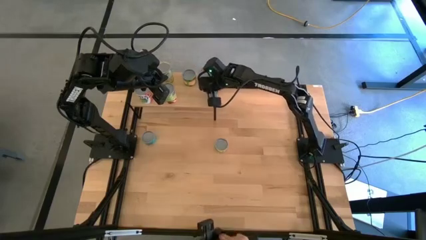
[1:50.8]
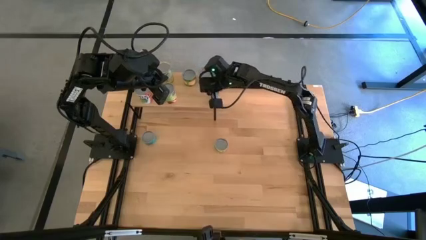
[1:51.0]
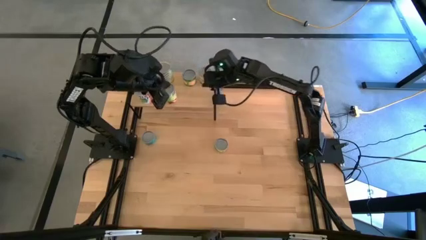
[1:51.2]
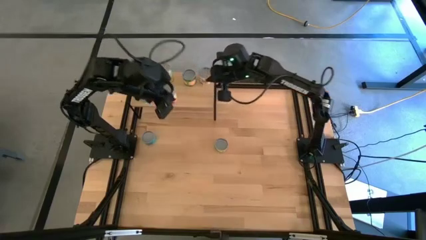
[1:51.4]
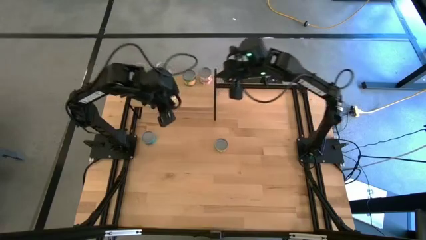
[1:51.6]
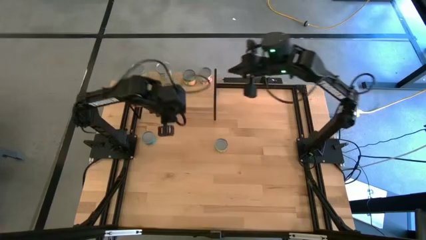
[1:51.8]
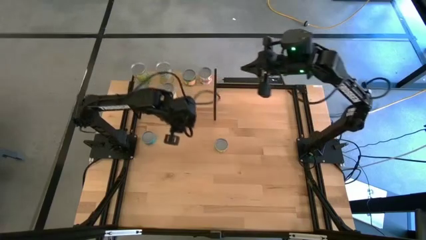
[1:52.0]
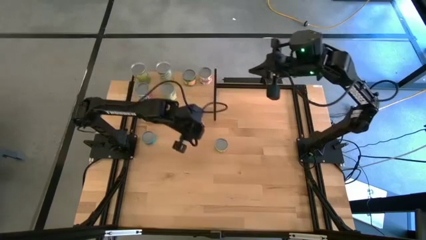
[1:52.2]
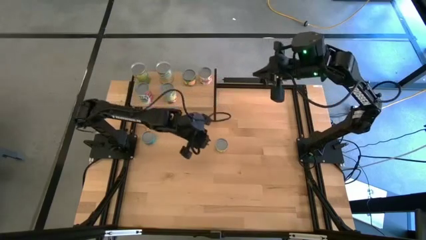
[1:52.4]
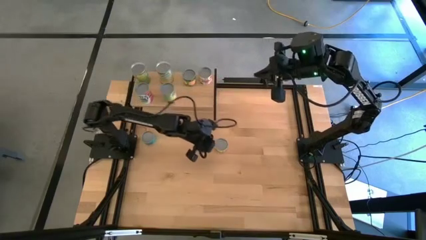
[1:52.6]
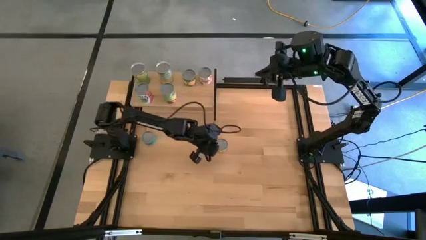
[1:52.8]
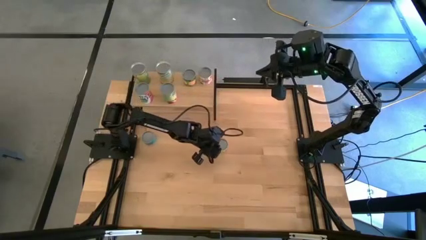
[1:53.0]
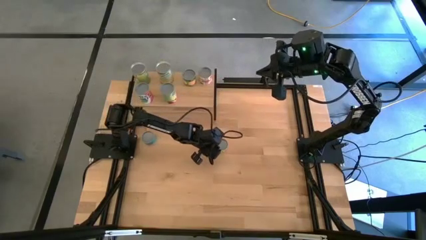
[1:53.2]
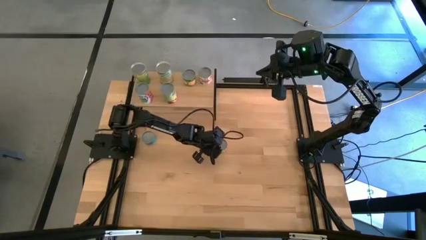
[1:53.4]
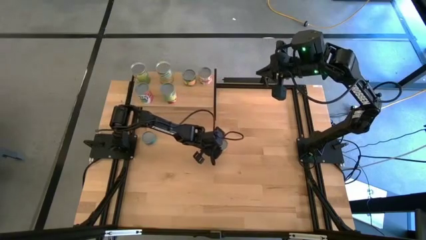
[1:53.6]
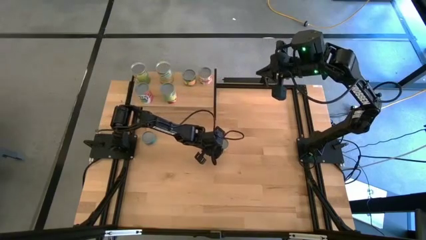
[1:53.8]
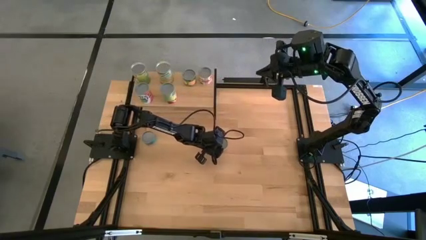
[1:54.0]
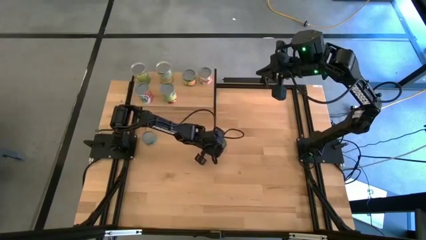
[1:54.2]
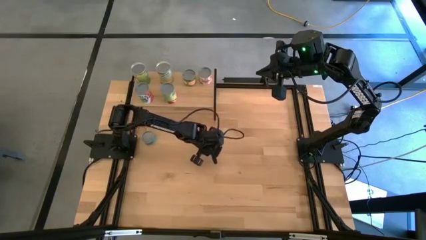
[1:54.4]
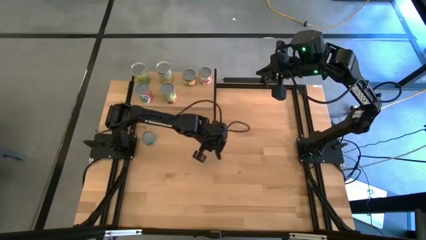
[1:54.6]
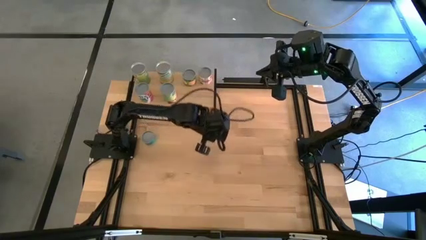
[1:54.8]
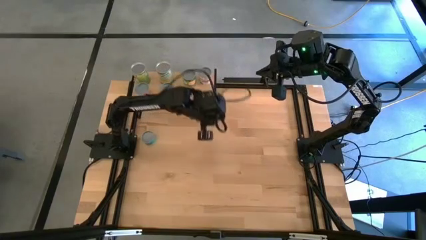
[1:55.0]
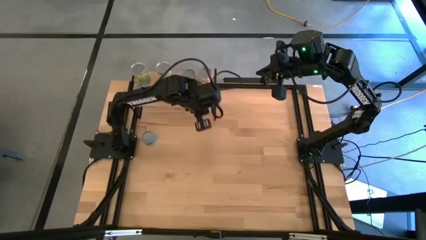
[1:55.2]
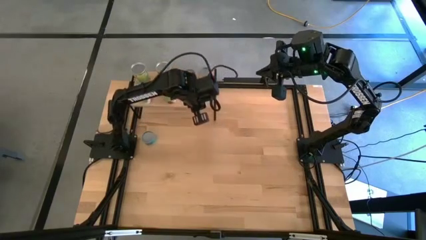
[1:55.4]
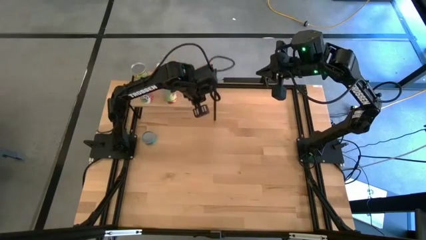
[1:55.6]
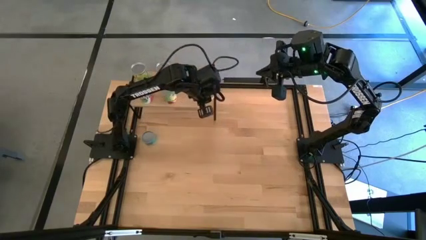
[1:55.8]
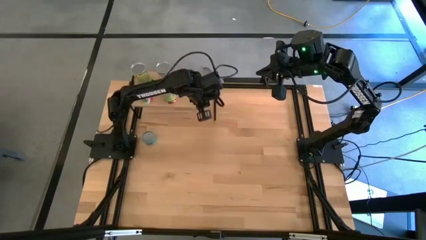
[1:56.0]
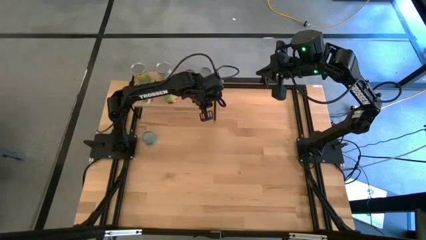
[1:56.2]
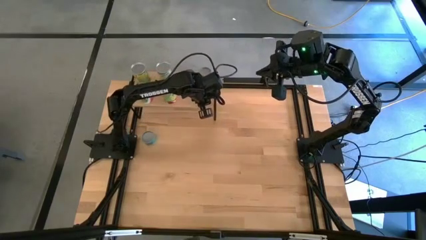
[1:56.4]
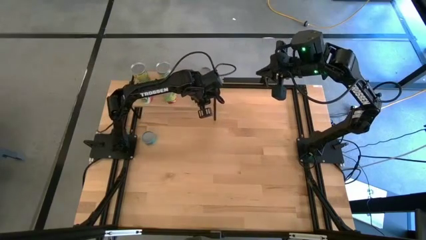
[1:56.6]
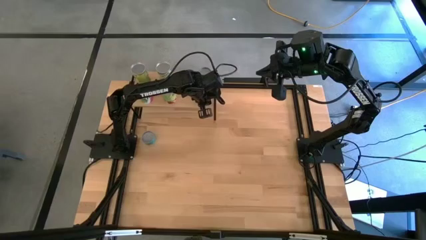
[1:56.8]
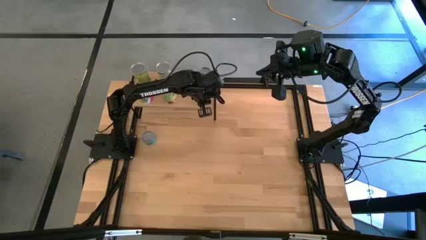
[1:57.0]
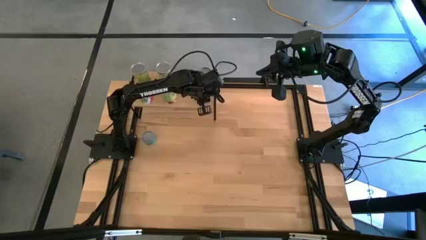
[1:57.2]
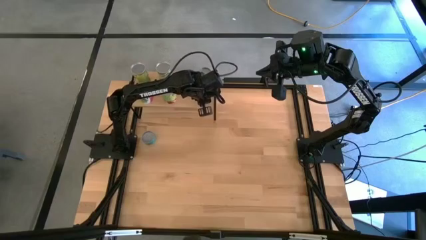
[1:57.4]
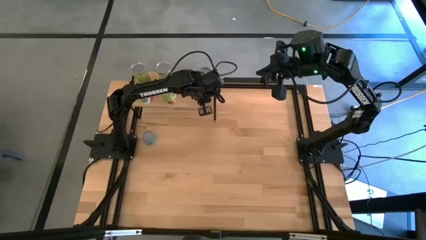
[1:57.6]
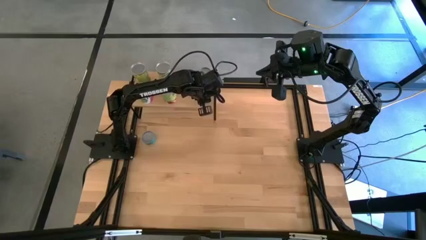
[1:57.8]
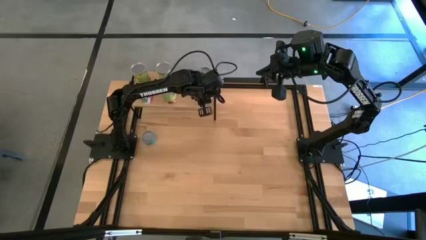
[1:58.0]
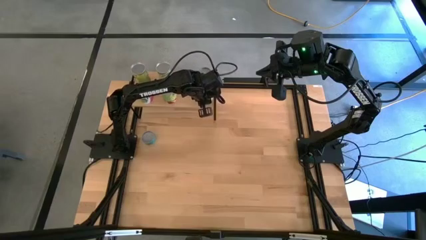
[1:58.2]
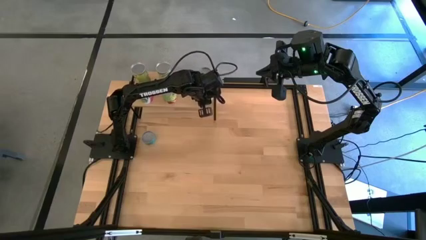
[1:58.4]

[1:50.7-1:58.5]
Task: Pick and place cans onto a shelf
Put the canned mushrooms on the shelf

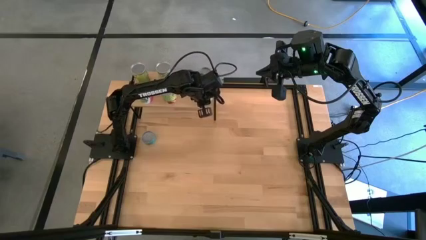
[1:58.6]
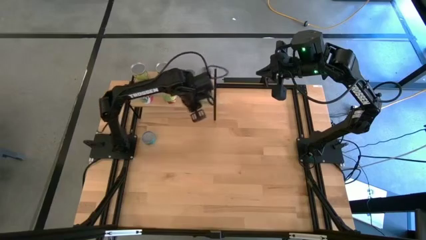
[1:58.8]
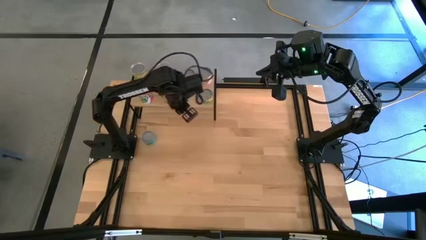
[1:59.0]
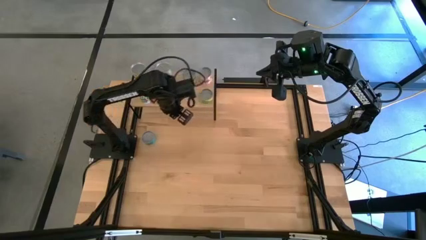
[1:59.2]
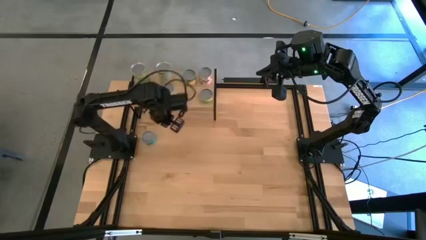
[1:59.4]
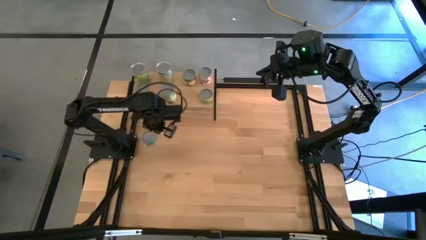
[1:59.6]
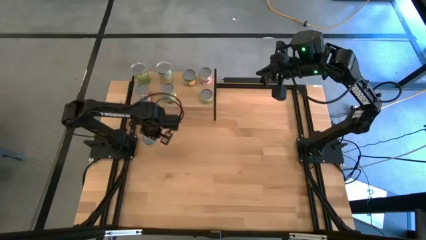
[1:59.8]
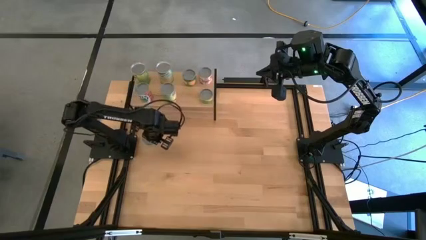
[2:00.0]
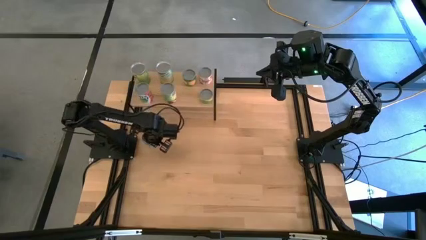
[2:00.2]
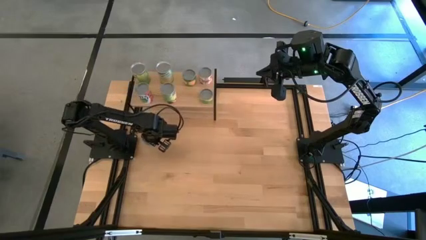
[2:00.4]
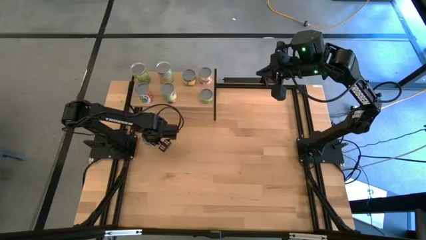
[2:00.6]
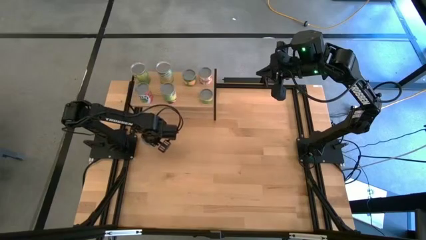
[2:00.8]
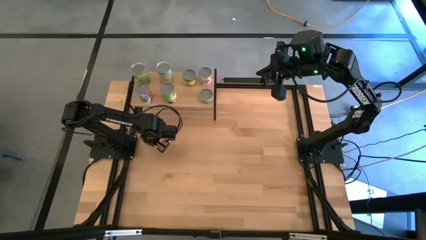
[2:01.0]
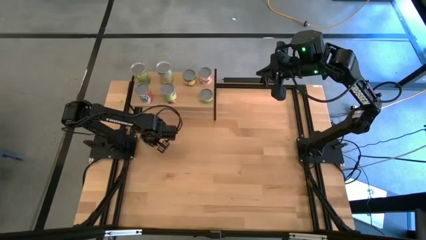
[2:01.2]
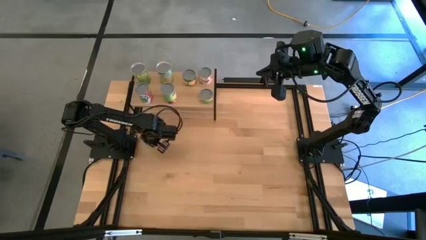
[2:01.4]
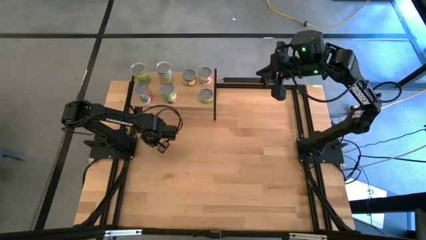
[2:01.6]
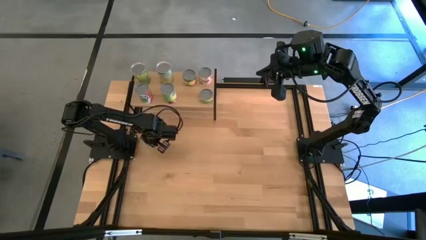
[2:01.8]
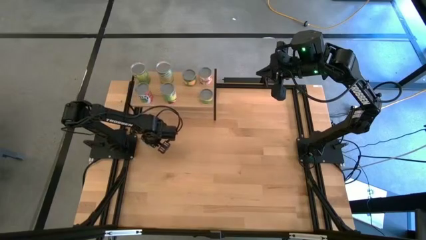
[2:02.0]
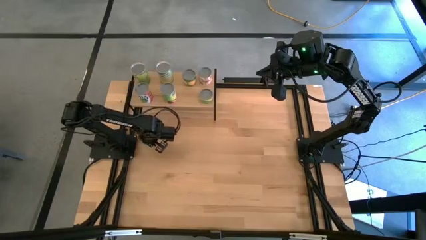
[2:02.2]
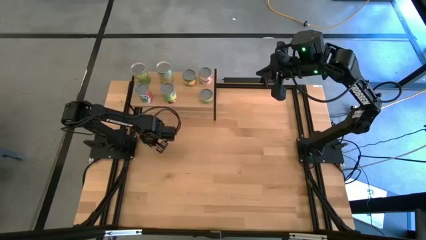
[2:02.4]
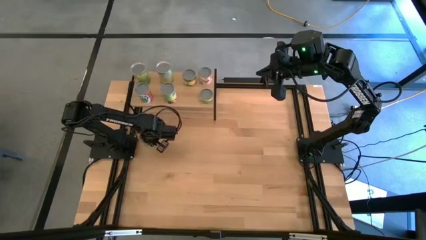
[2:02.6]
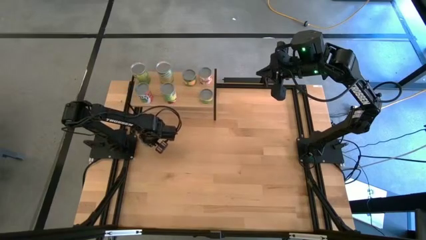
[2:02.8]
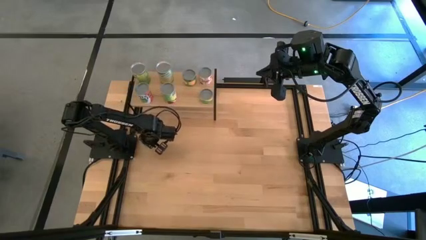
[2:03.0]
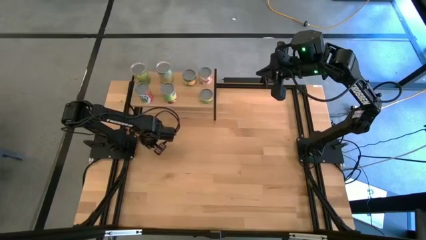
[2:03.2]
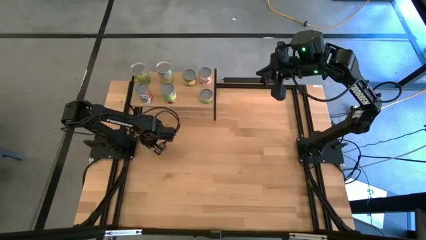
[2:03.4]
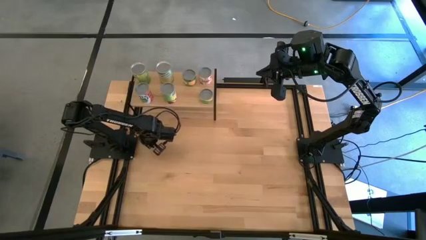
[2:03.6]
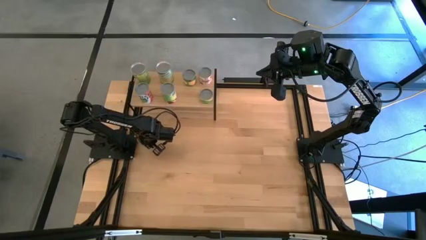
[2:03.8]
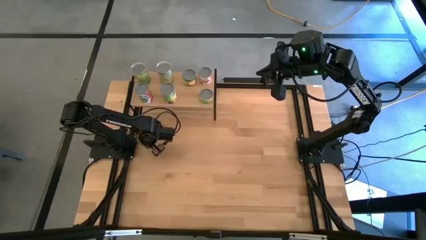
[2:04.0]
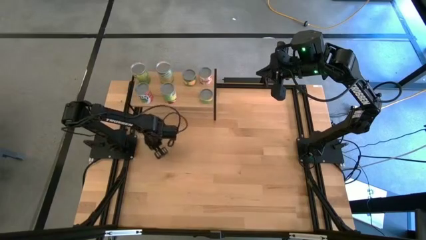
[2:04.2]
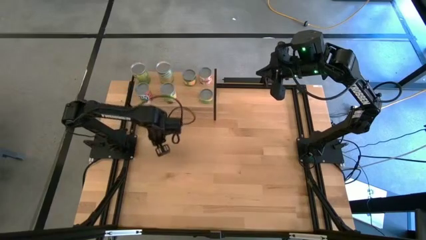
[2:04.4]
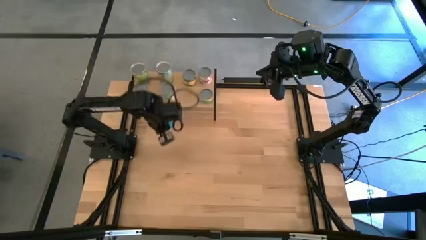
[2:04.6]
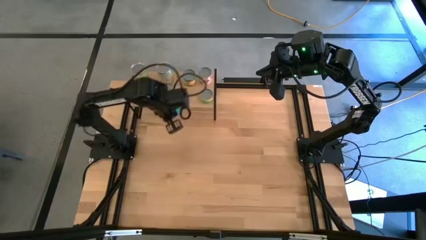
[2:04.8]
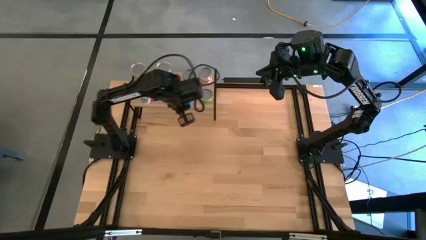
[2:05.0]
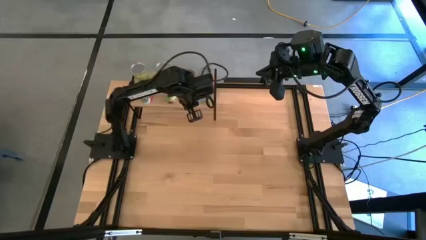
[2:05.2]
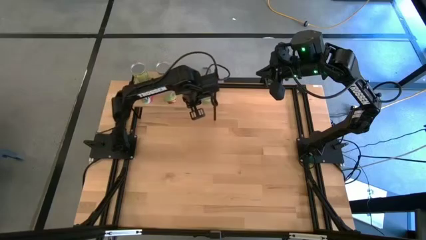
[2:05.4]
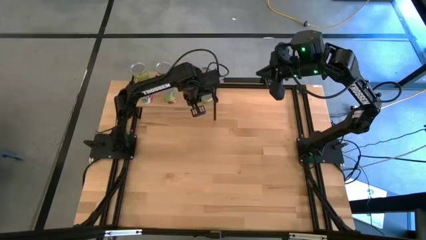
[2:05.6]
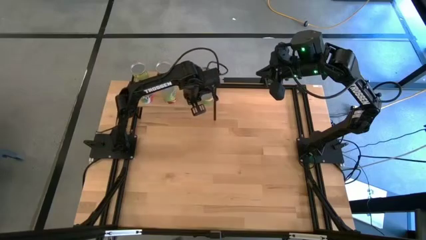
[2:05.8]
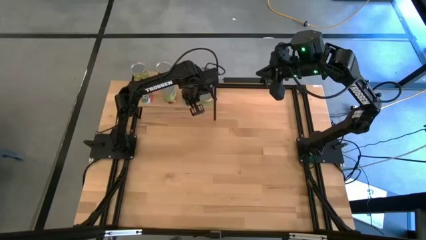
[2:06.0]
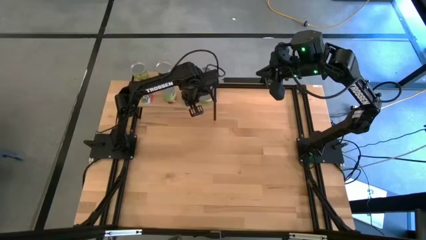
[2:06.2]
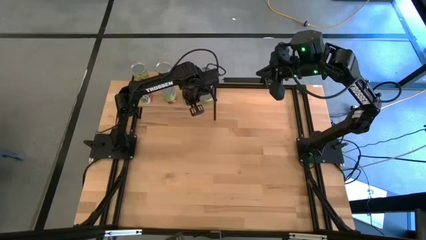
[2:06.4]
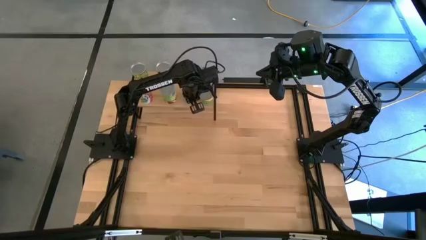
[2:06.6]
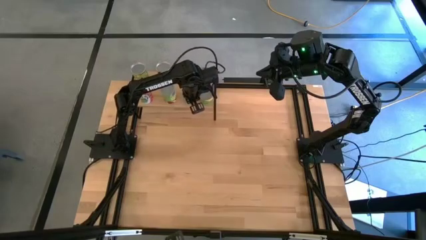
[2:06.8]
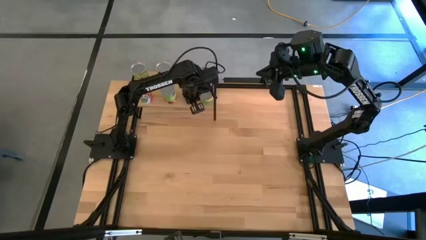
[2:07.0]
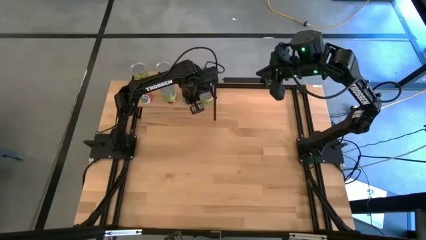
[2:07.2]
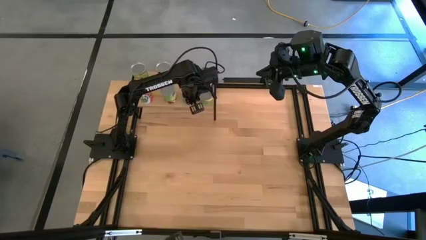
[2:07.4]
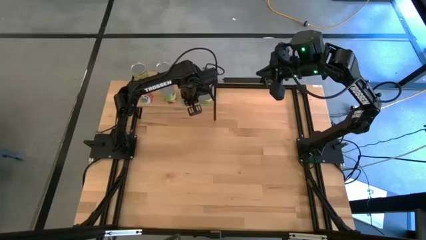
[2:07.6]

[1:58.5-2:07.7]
Put the canned tuna on the shelf
